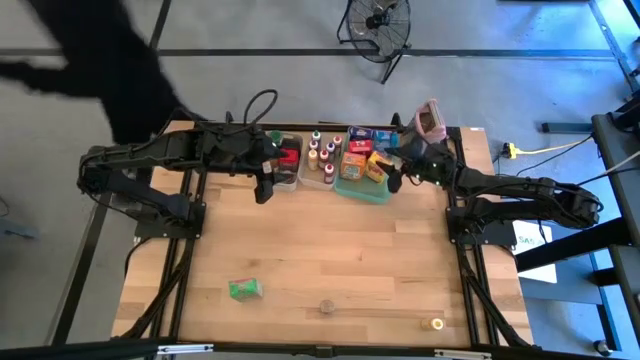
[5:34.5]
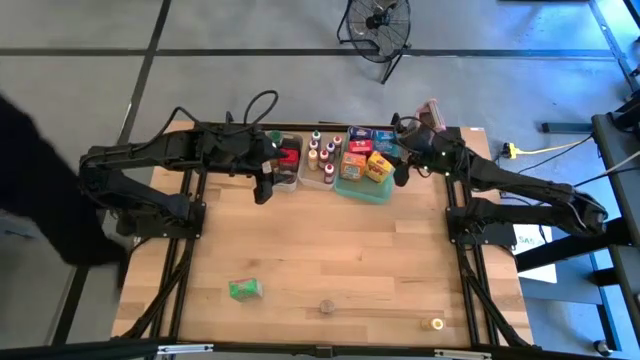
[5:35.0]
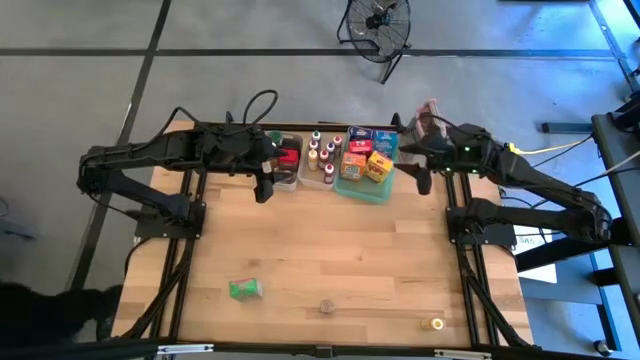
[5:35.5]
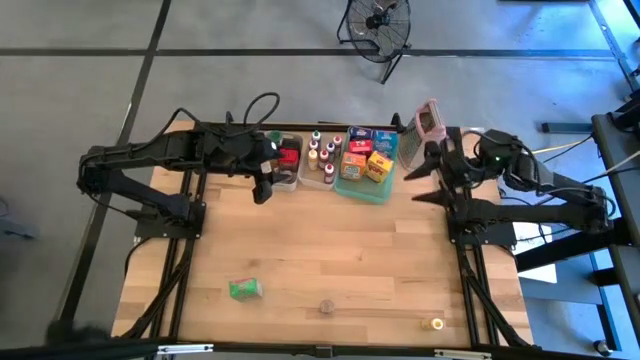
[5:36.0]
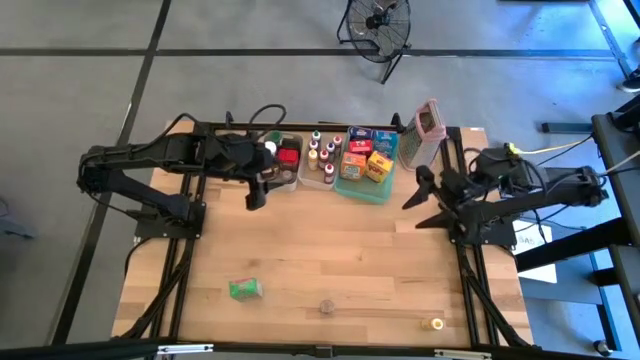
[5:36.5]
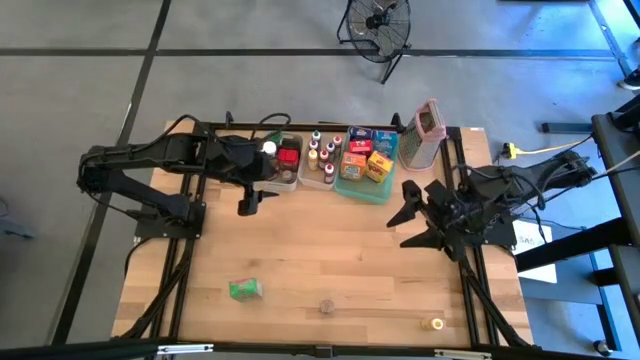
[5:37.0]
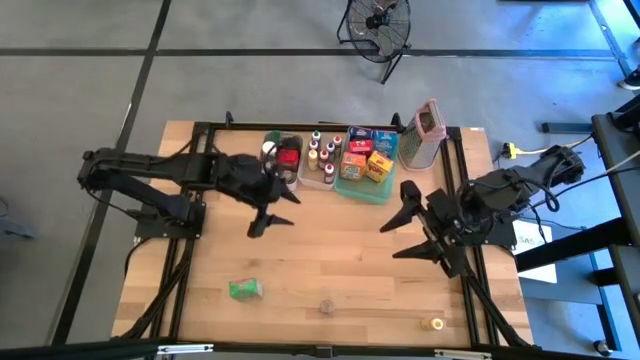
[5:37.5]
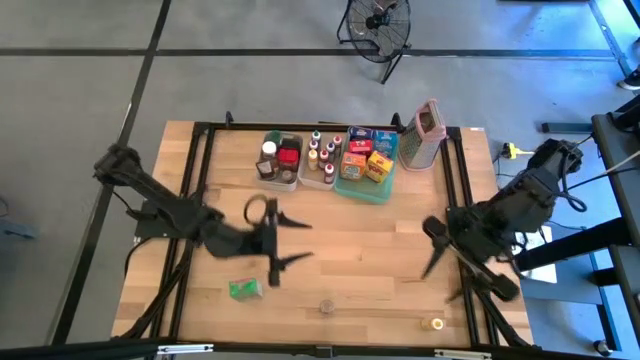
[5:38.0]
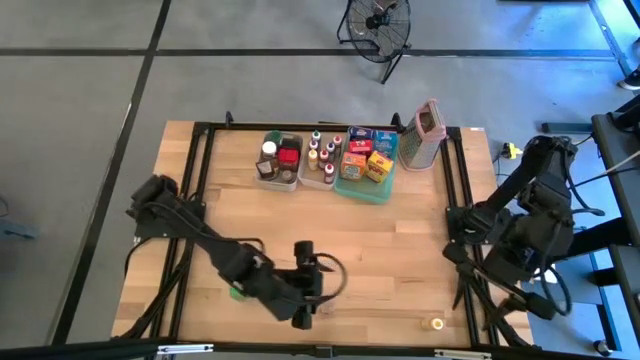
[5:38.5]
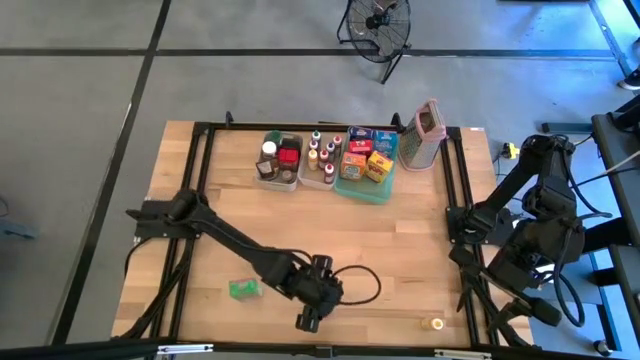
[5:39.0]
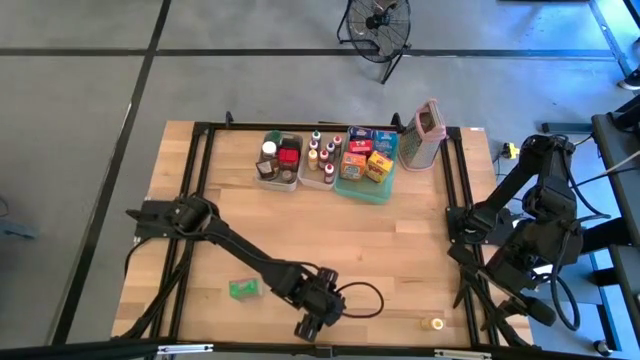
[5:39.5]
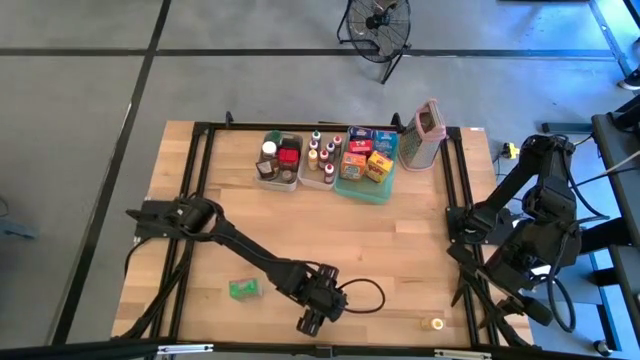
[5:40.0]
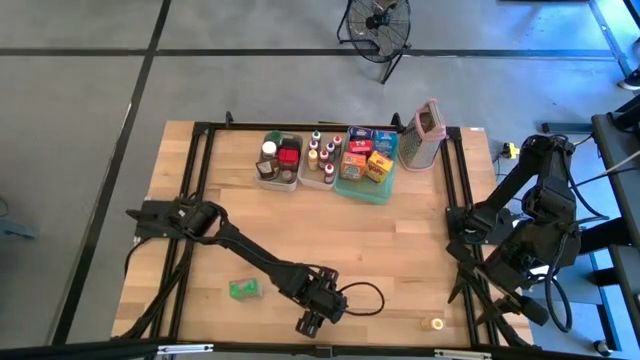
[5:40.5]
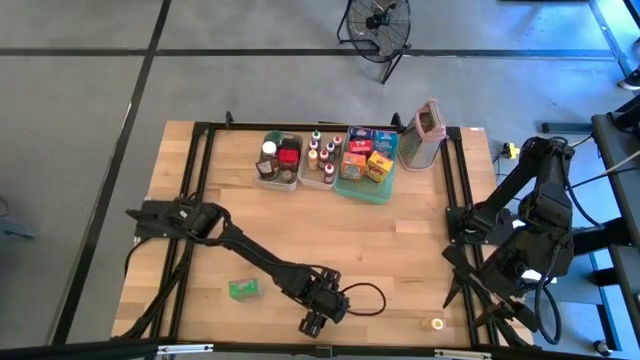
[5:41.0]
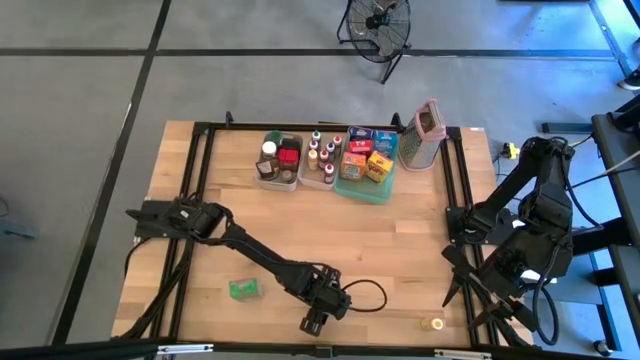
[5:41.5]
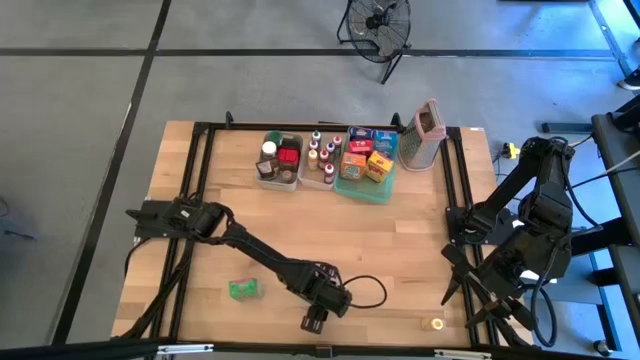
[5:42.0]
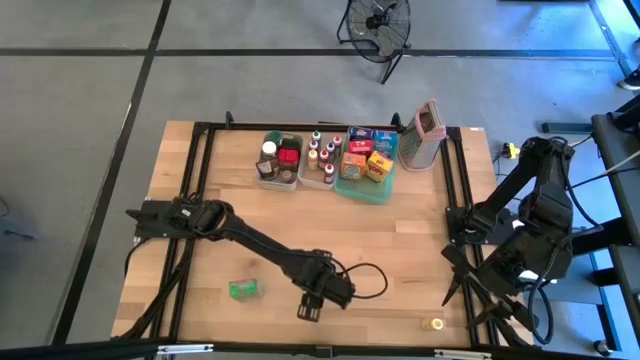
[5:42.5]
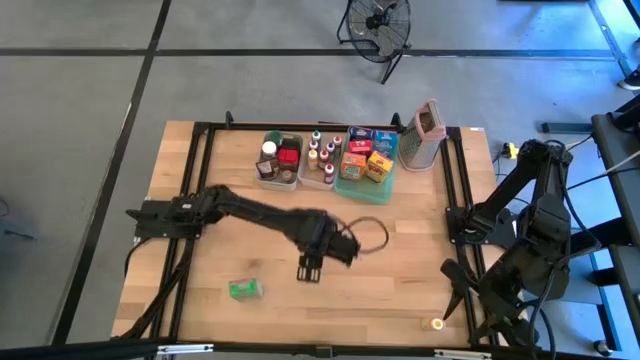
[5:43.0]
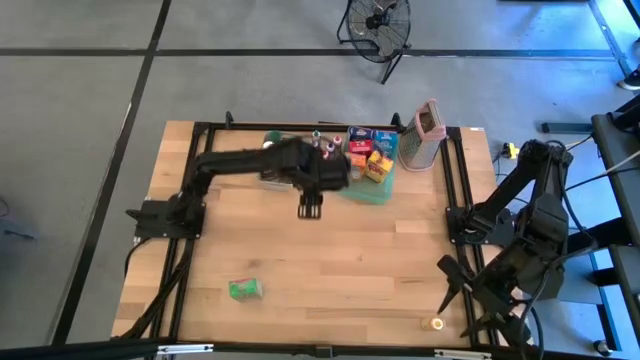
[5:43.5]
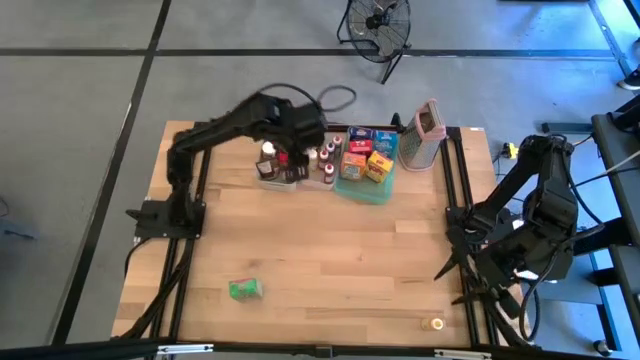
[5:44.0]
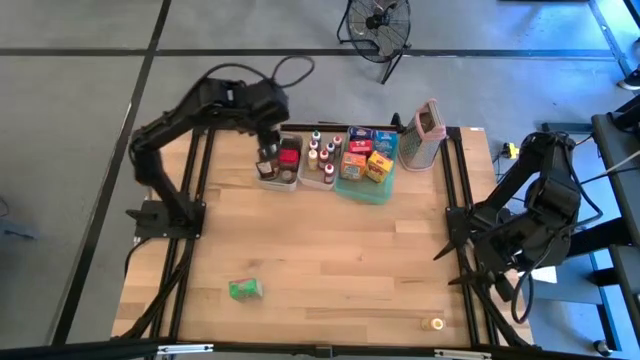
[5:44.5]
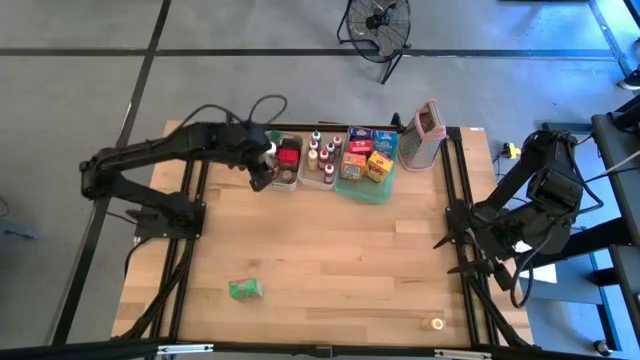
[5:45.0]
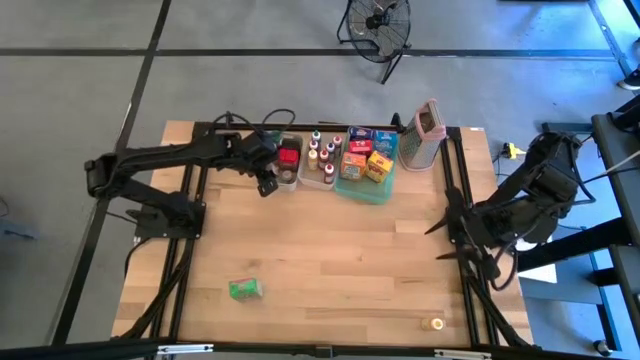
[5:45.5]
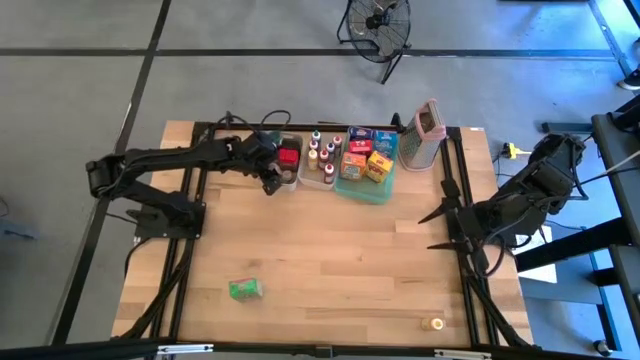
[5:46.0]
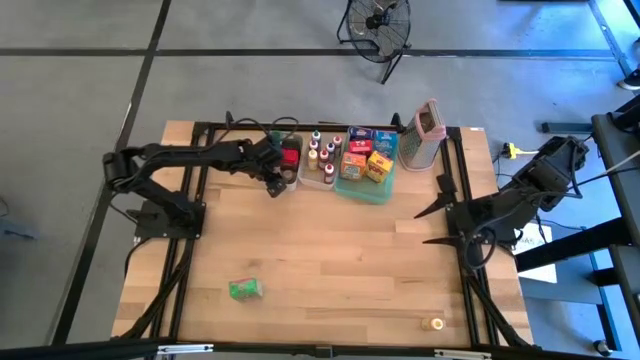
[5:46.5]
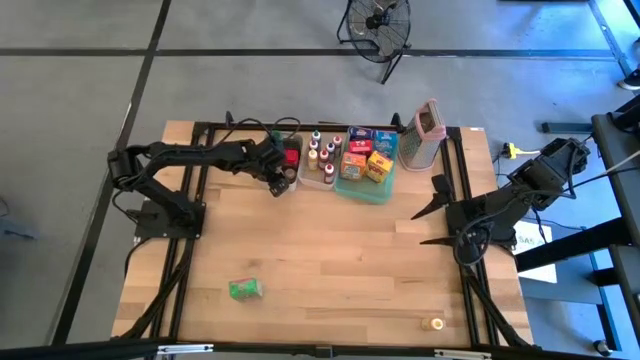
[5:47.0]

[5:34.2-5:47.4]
Task: Pick & Place Kitchen Items
Put the brown seasoning bottle into the gray bin

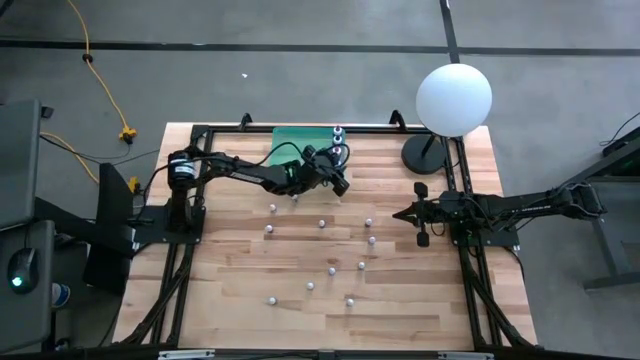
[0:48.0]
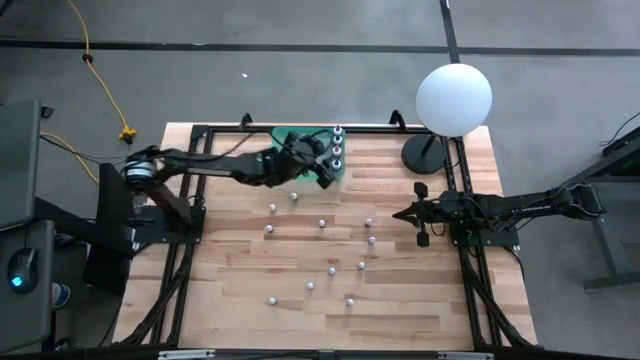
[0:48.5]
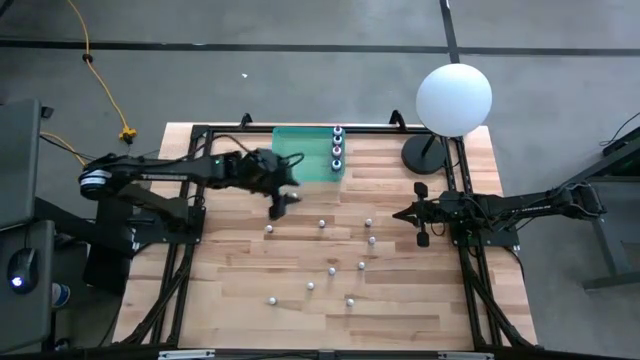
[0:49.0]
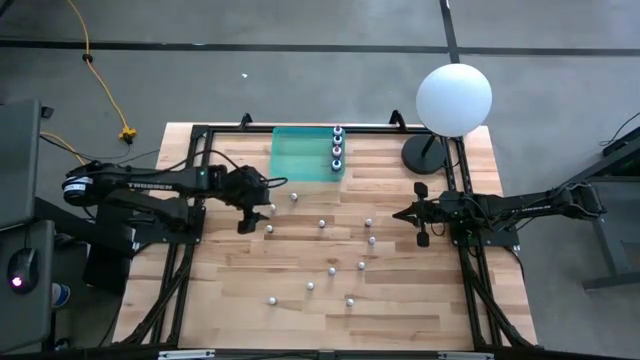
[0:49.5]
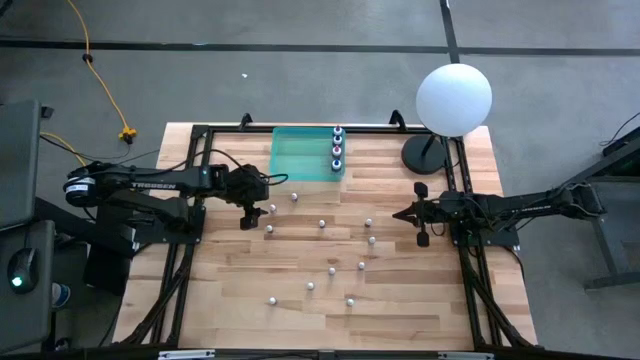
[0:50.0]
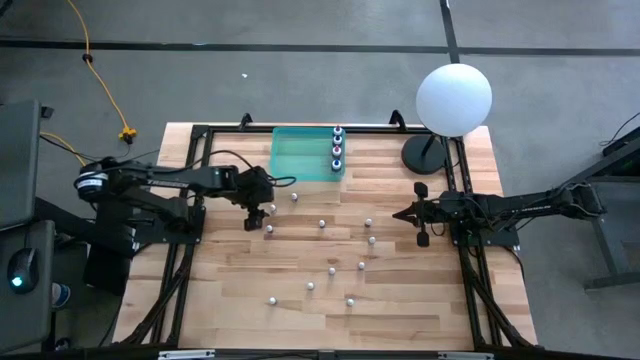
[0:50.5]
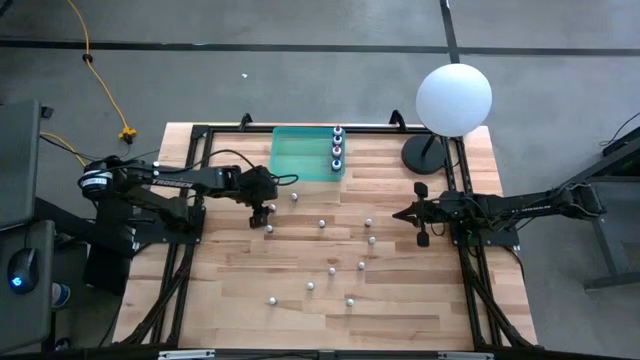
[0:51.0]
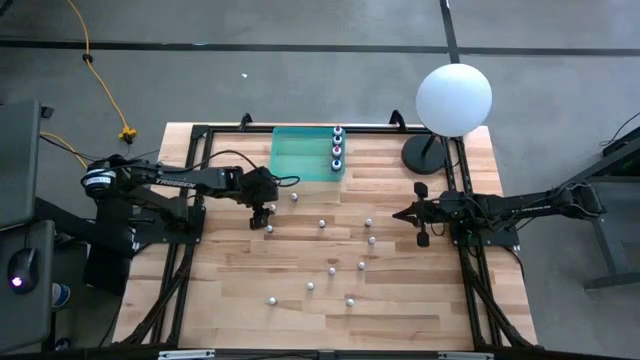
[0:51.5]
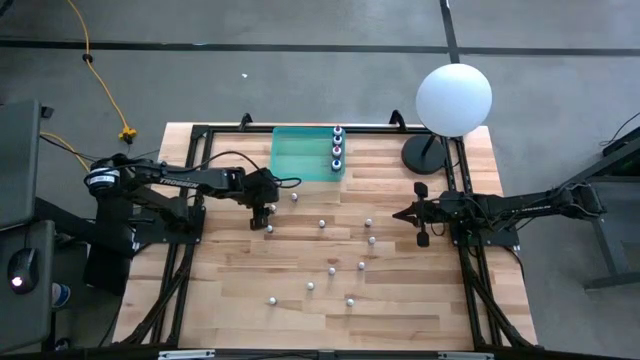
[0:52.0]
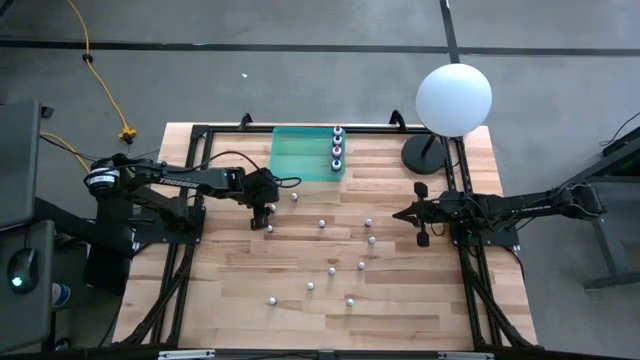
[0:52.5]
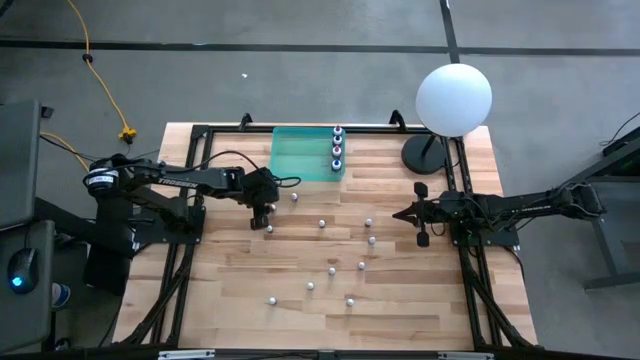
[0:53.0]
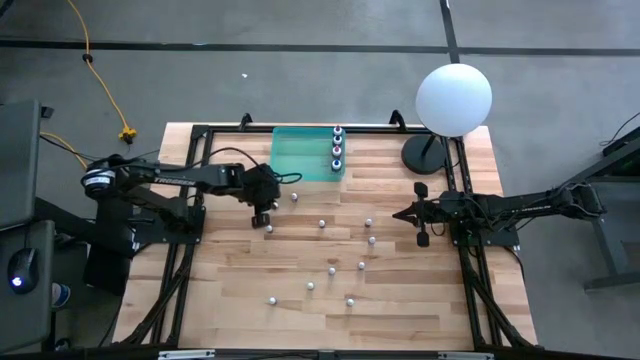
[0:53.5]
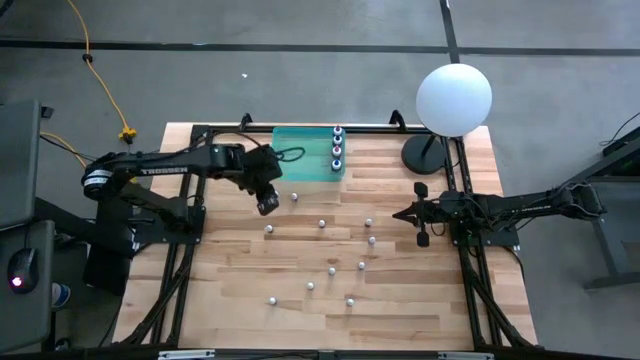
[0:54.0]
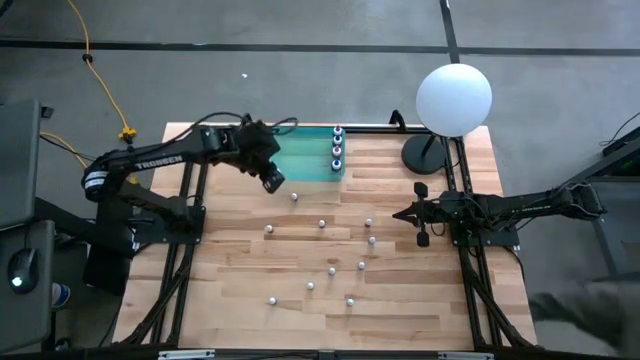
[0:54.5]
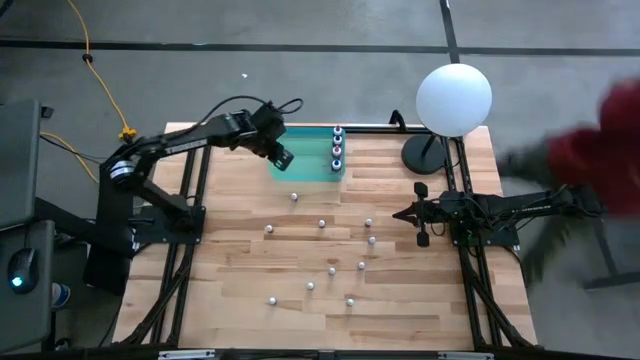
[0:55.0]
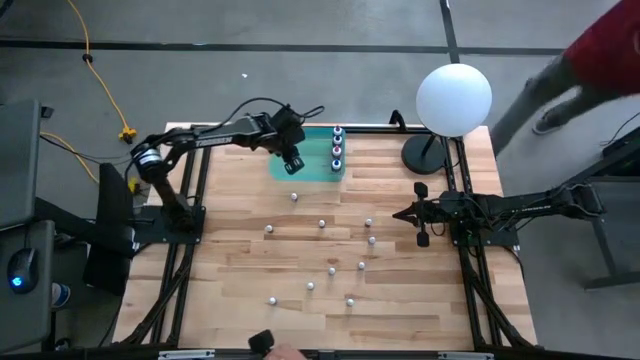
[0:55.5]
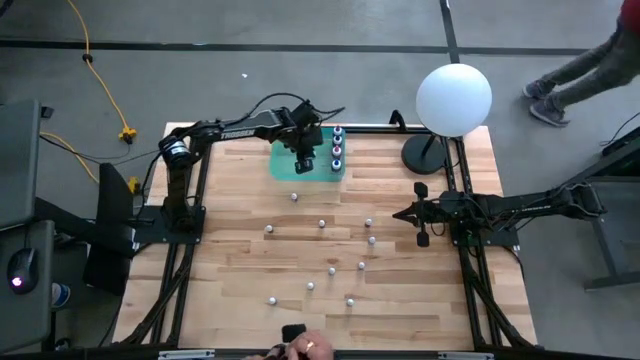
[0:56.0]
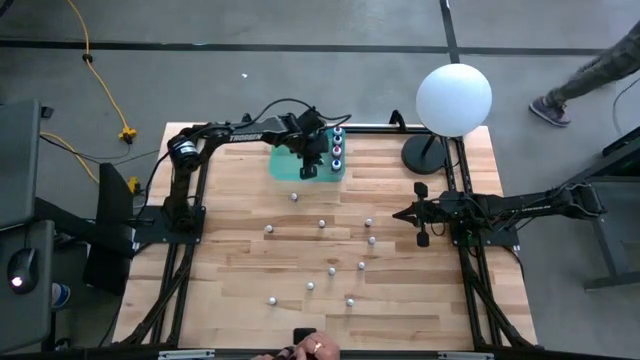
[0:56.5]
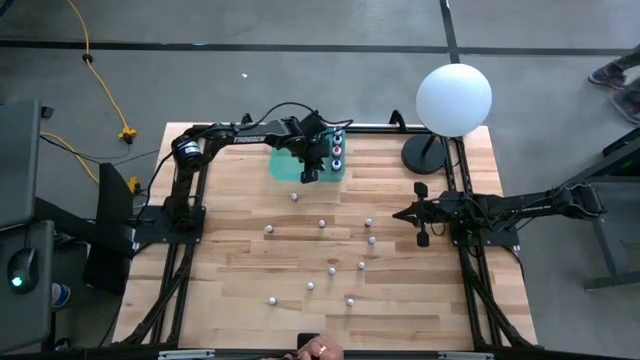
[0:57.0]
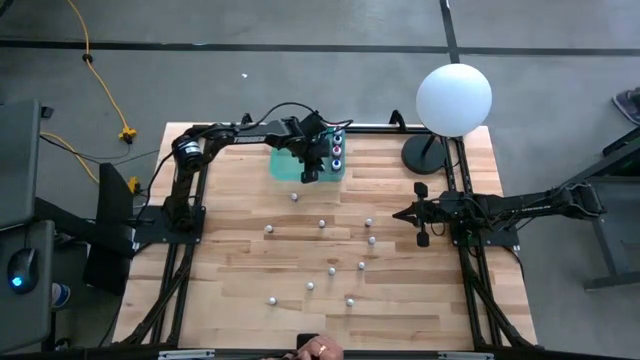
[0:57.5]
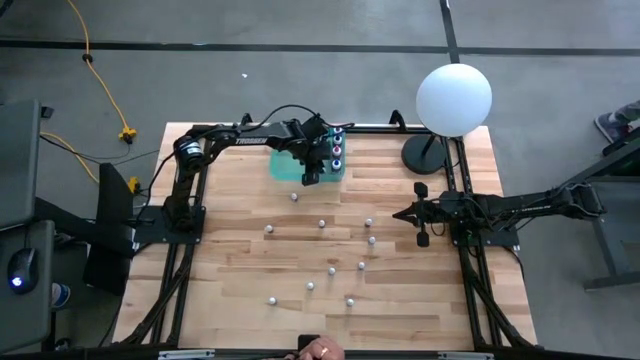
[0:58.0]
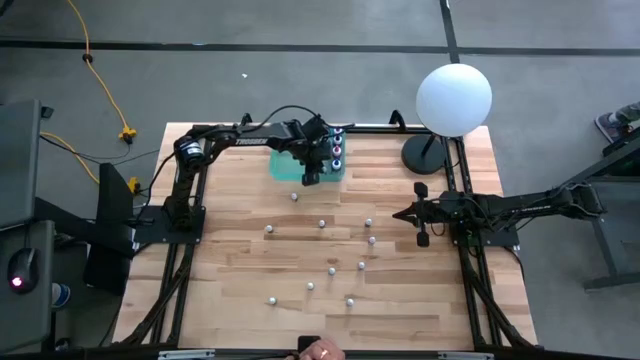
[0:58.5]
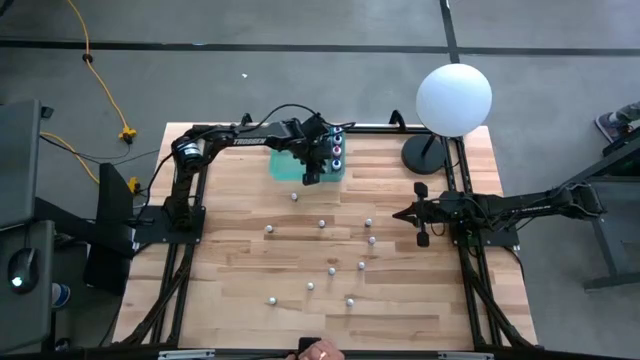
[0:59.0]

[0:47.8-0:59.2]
Task: Pick & Place food coloring
Put the small orange food coloring bottle into the blue transparent bin
